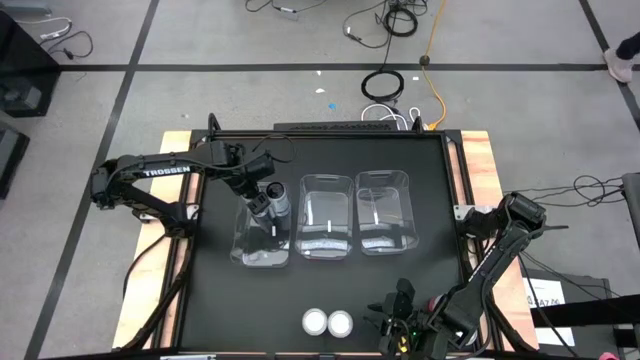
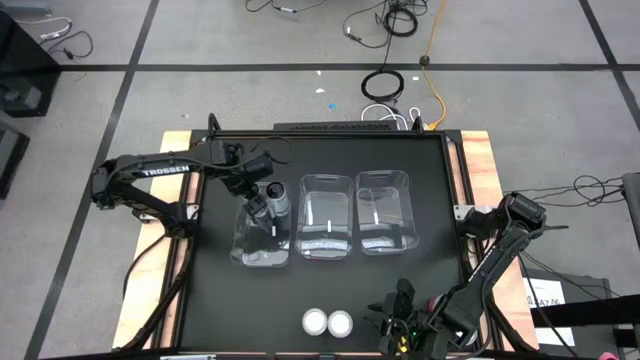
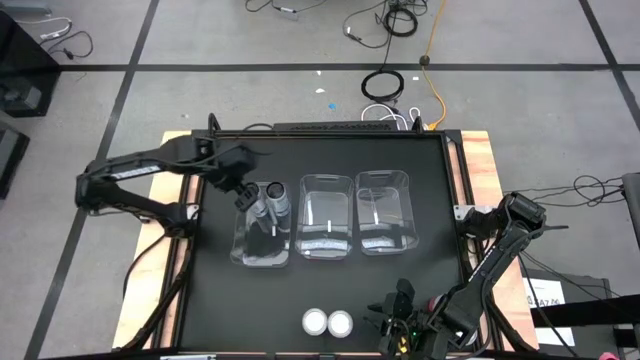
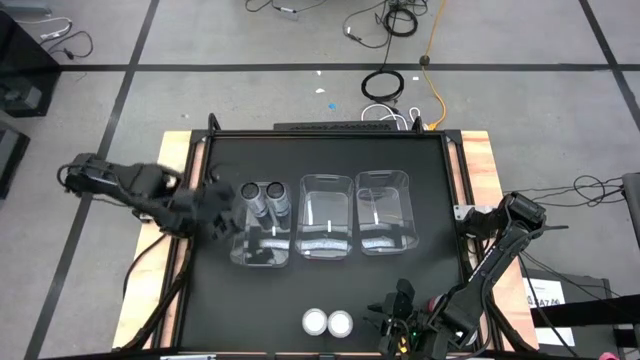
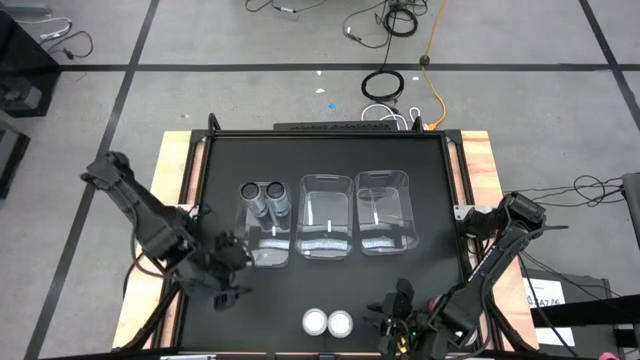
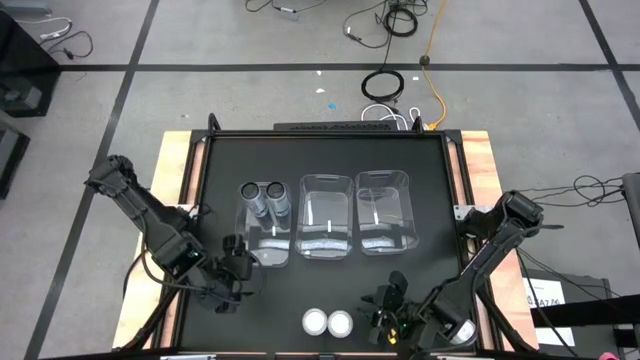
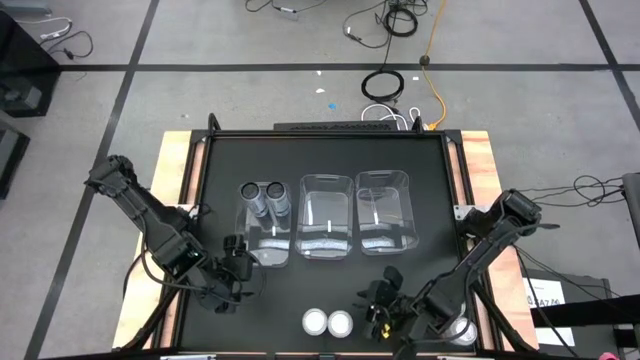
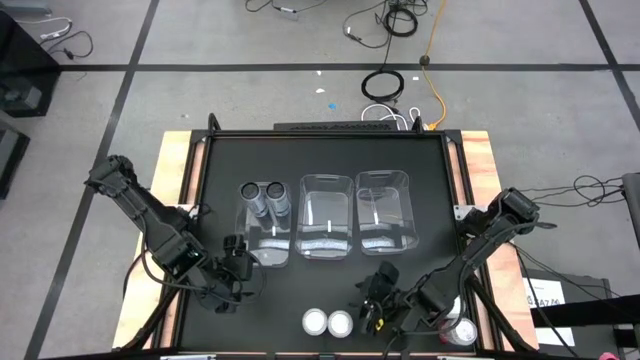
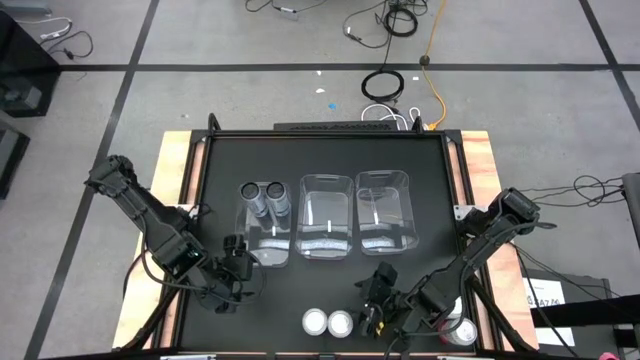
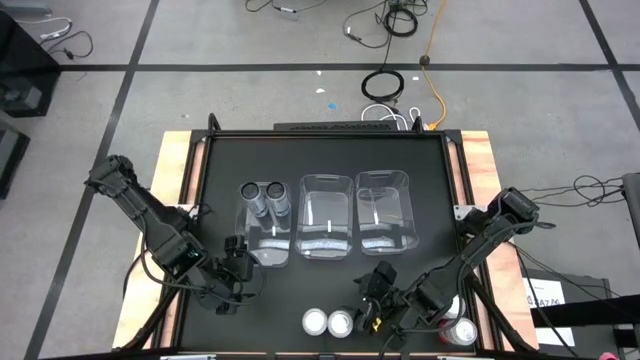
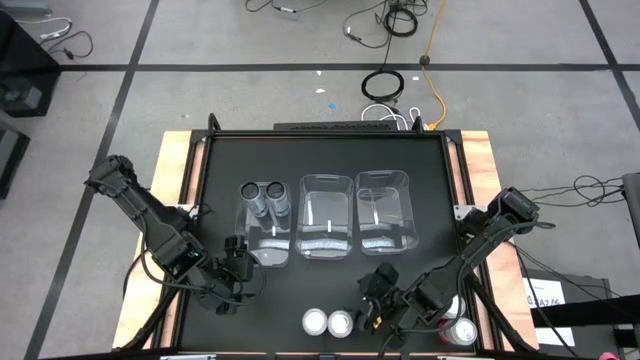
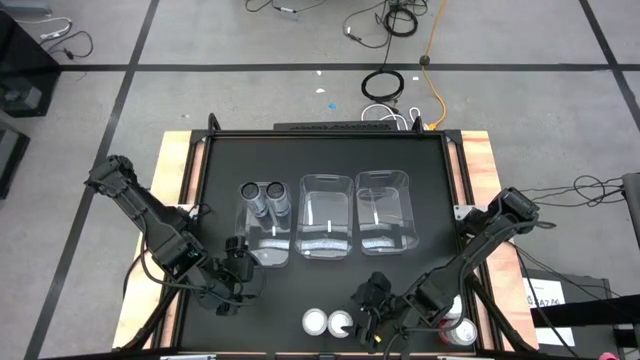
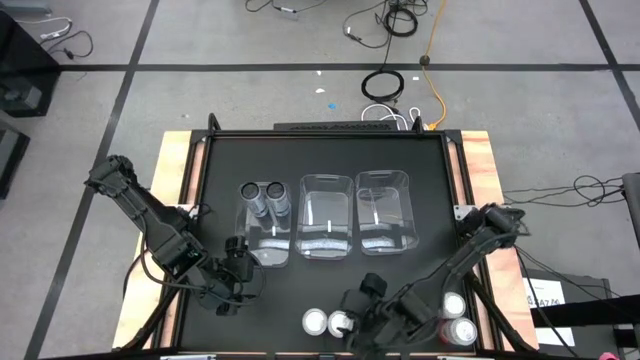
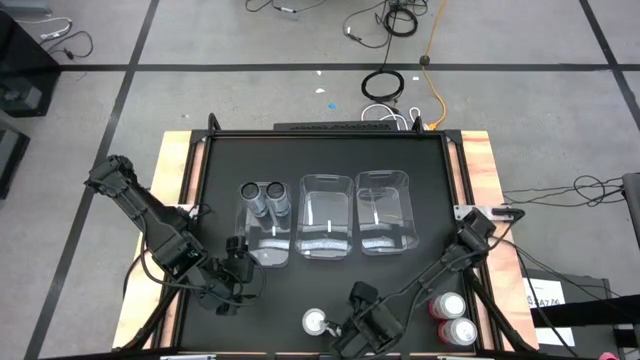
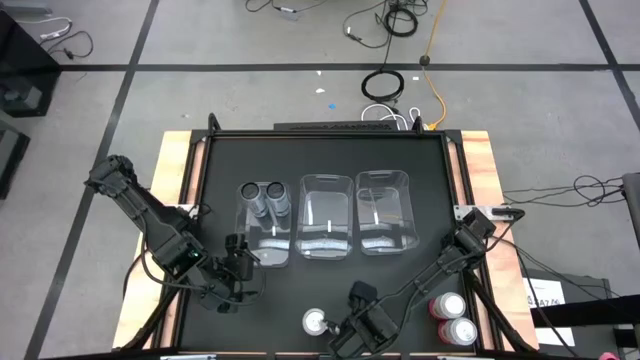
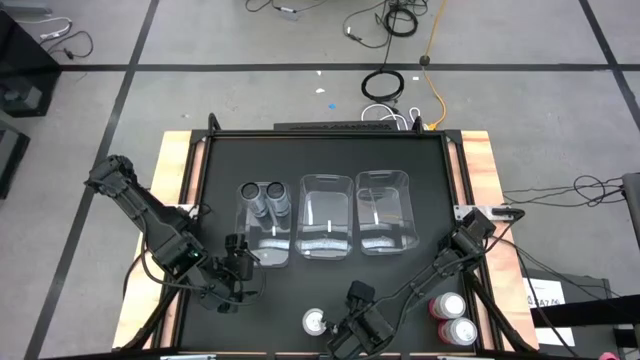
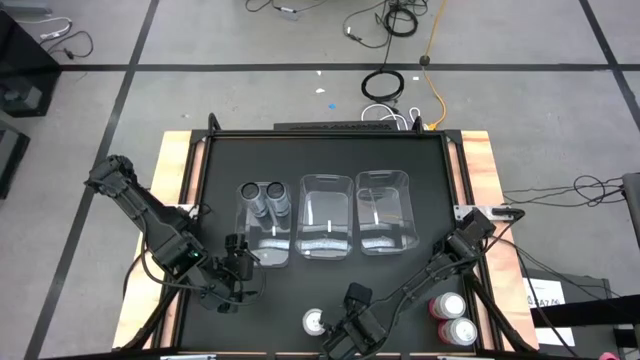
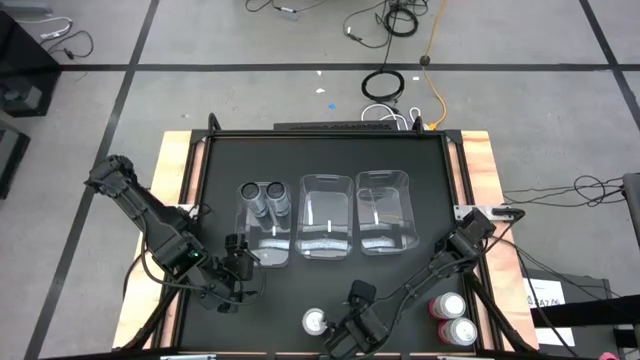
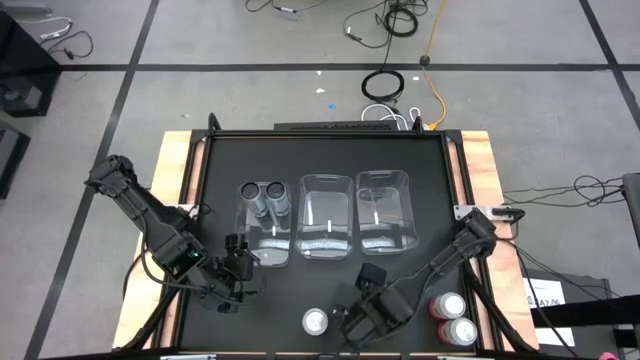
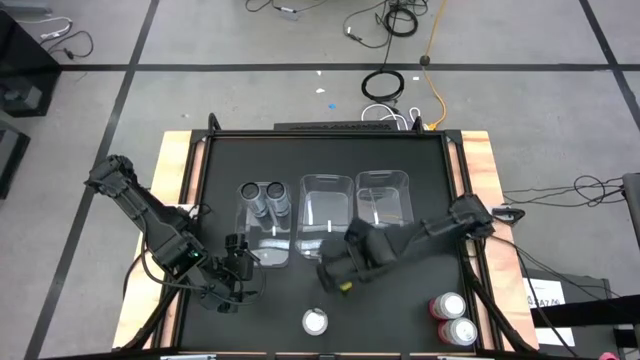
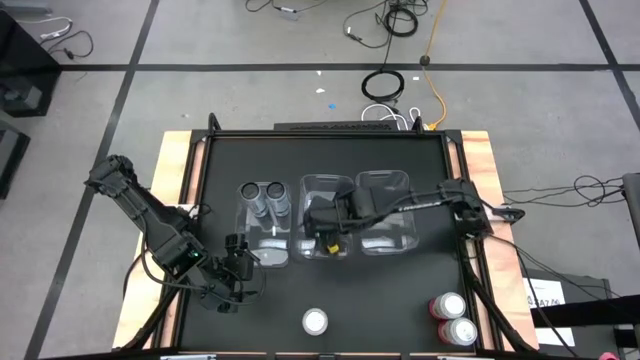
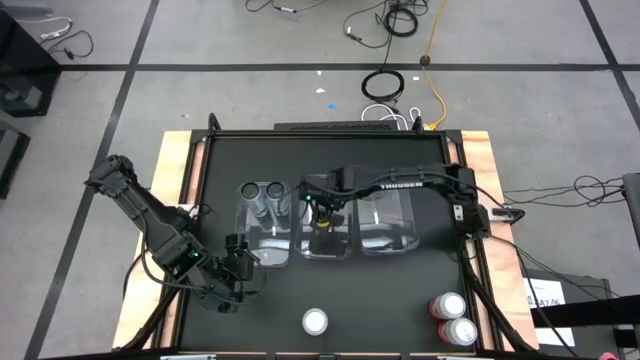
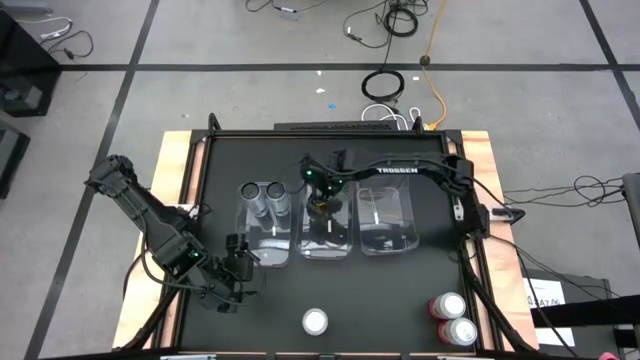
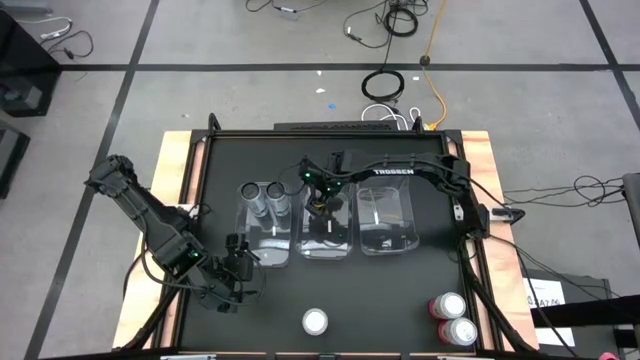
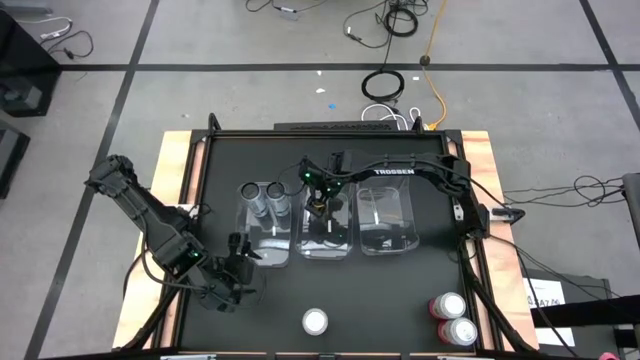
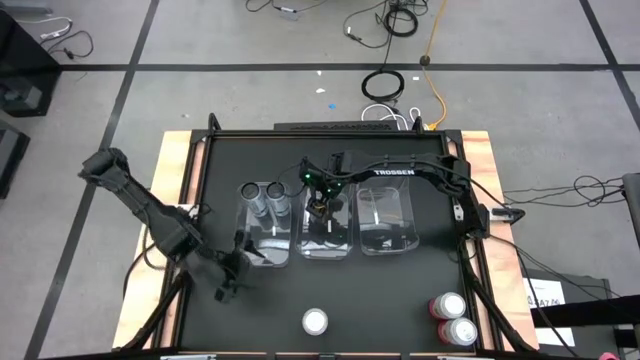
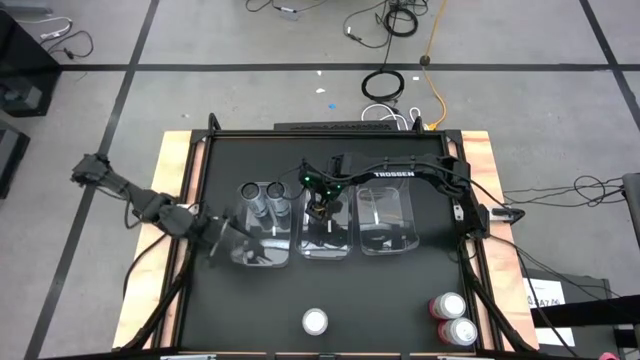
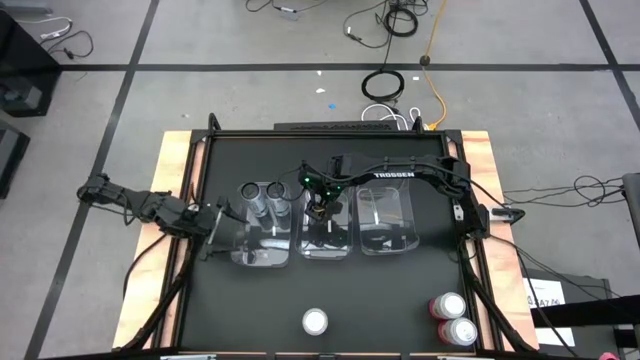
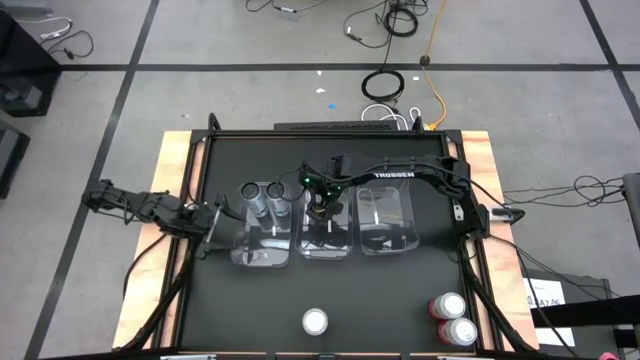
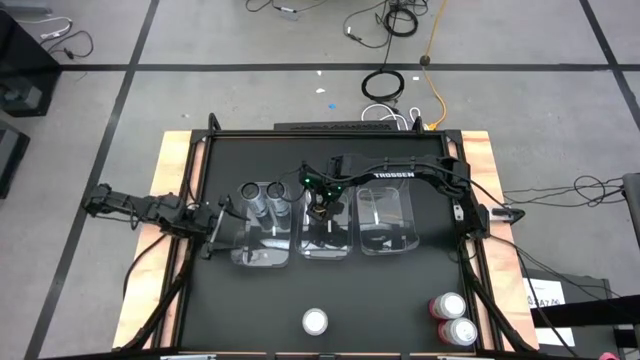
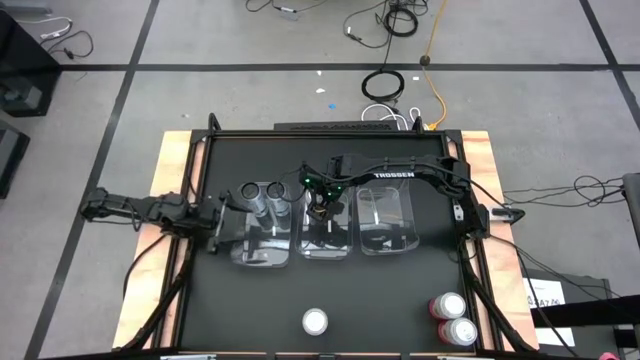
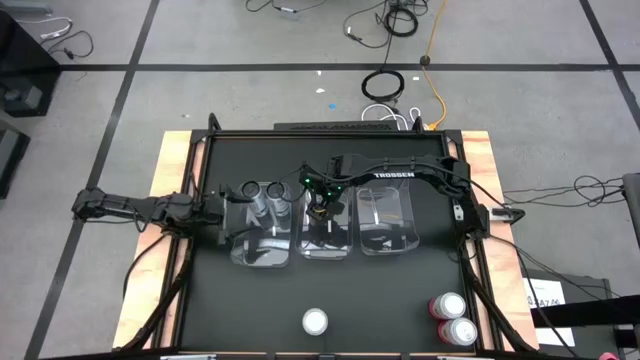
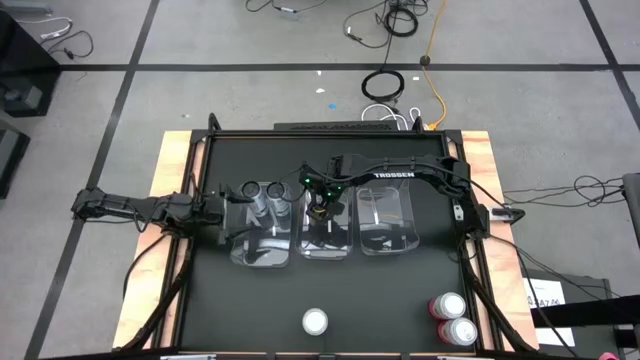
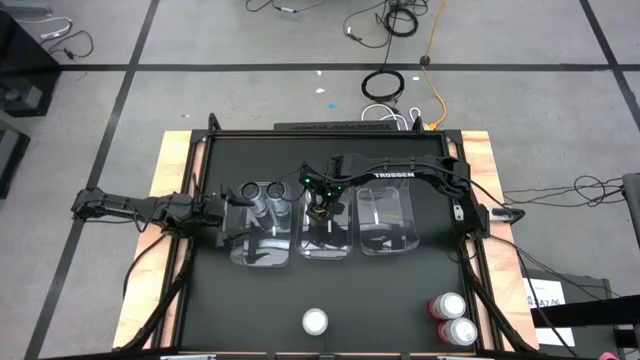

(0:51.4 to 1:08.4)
Task: Sort soda cans
Put the right orange soda can into the middle transparent bin

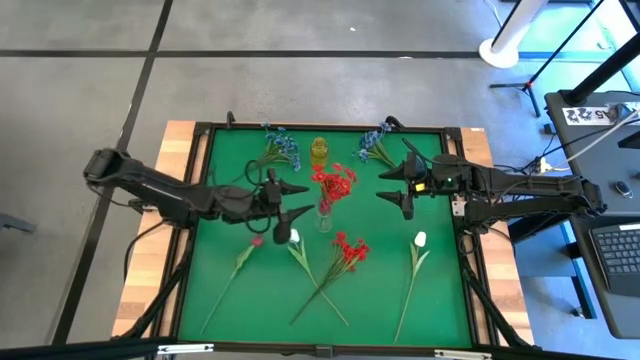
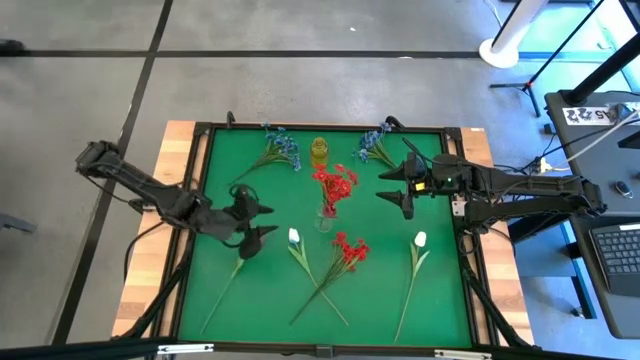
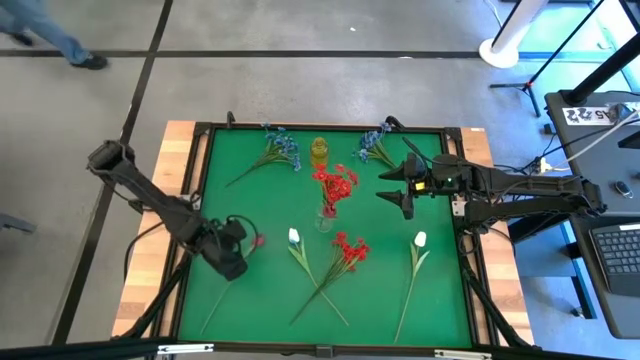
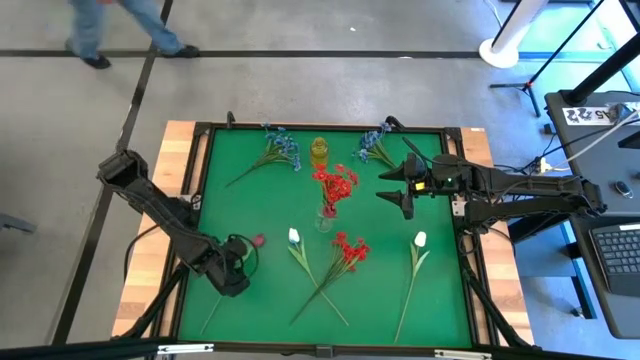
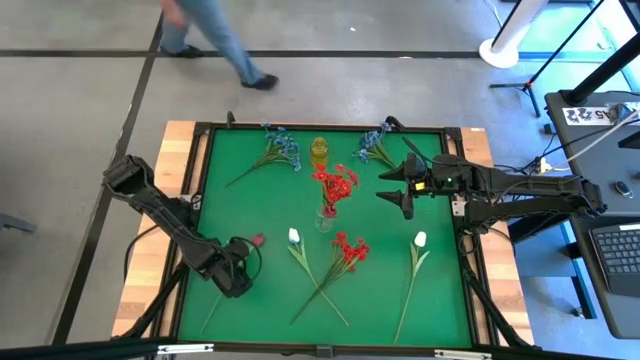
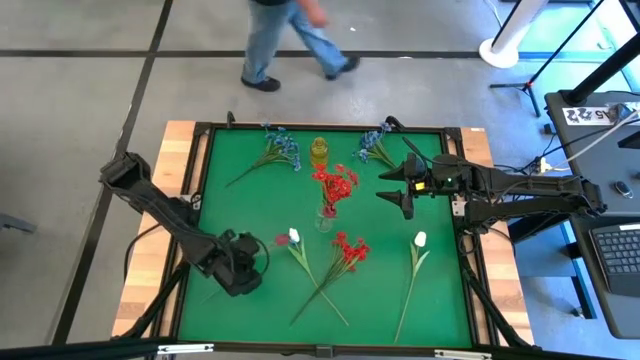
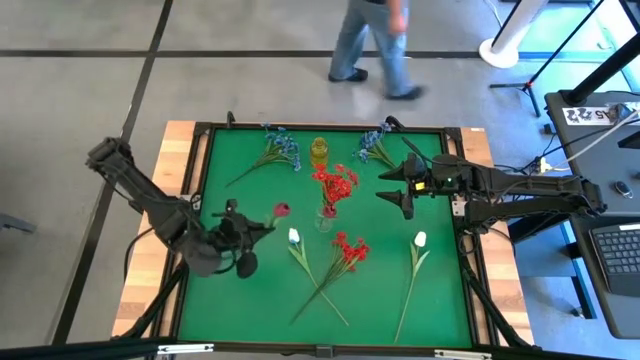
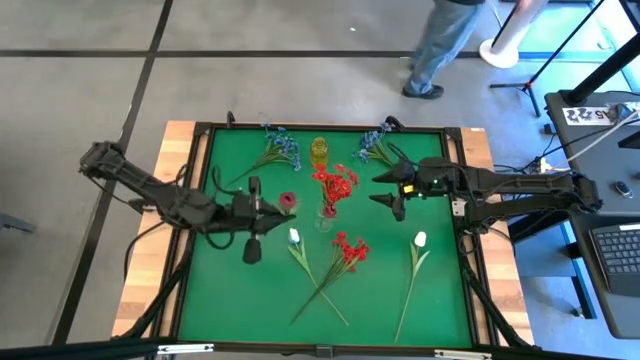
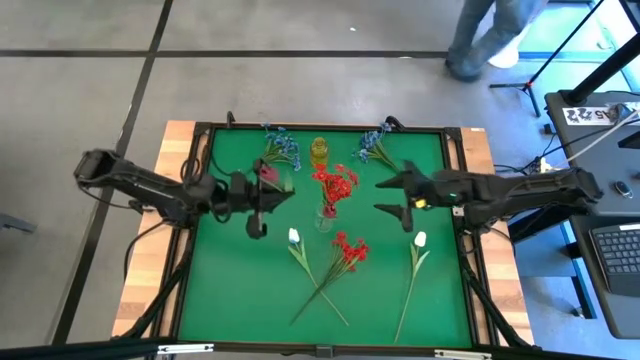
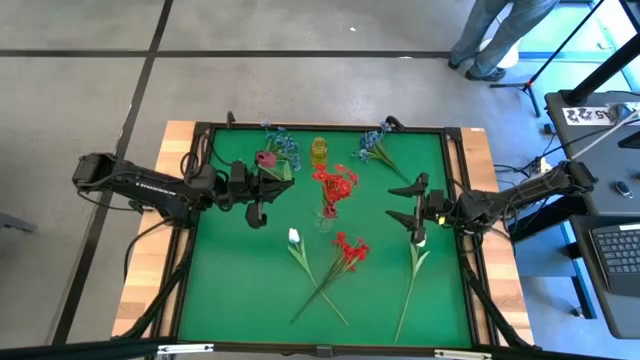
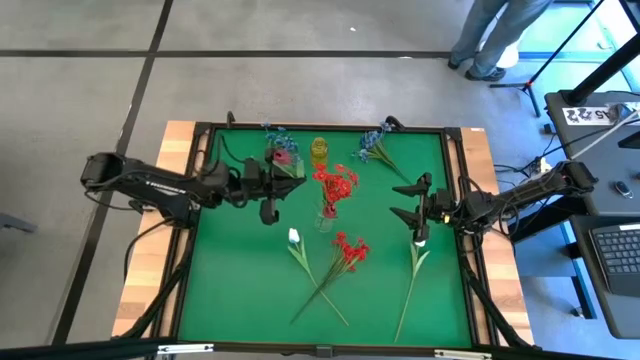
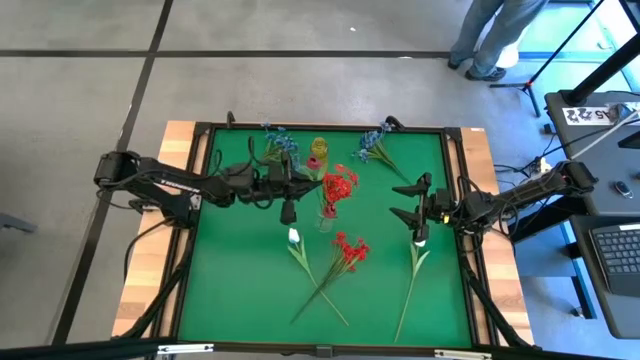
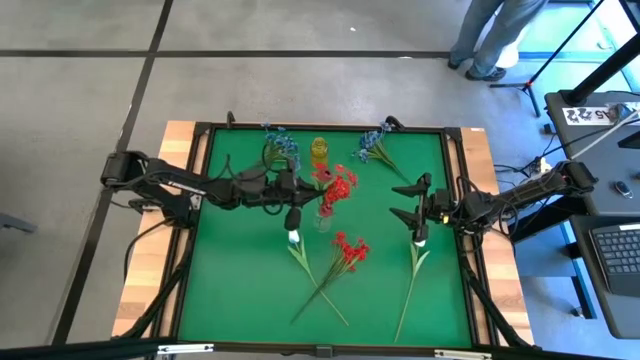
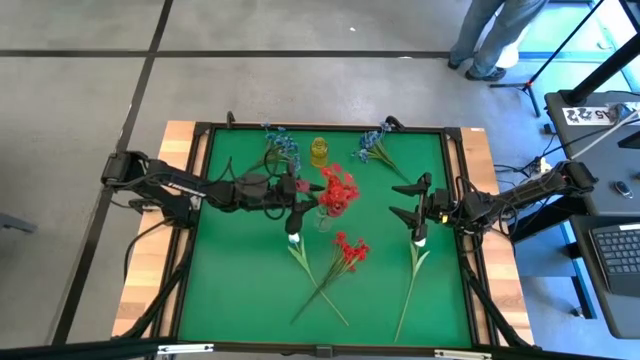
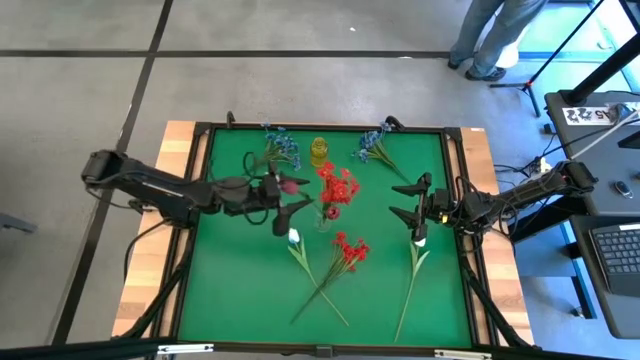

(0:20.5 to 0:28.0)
Task: Sort flowers into vase by color
Put the red flower into the transparent vase
